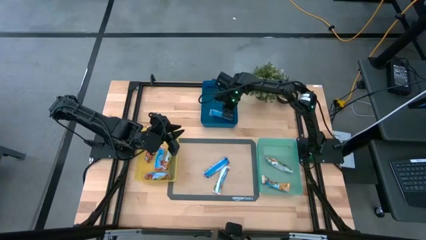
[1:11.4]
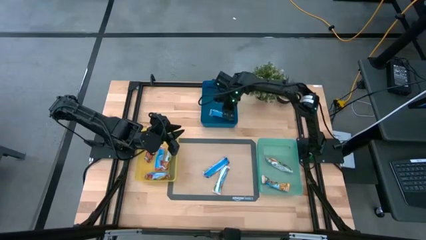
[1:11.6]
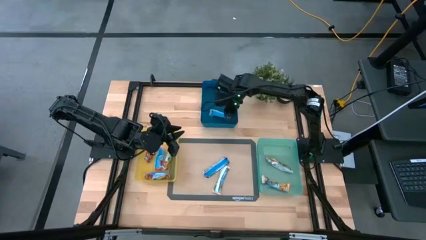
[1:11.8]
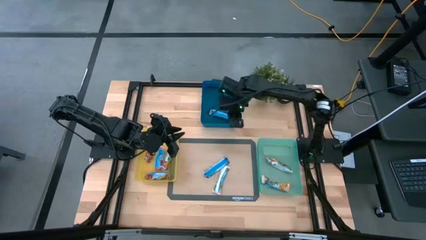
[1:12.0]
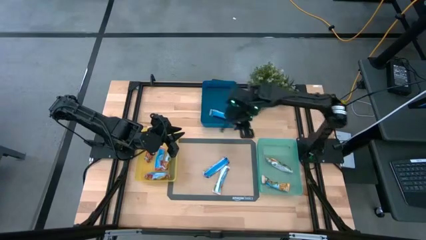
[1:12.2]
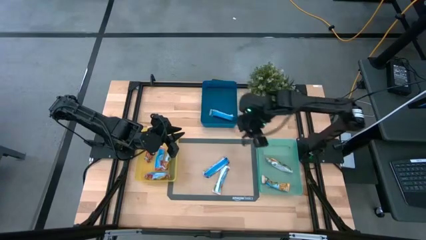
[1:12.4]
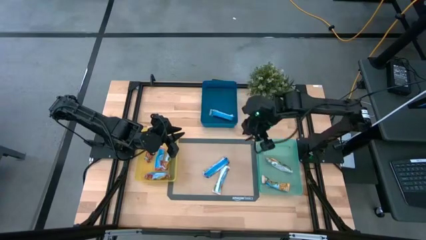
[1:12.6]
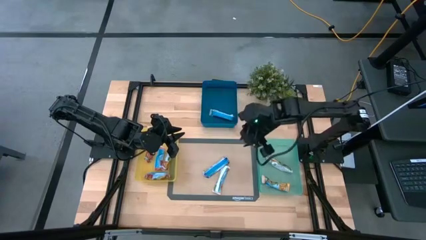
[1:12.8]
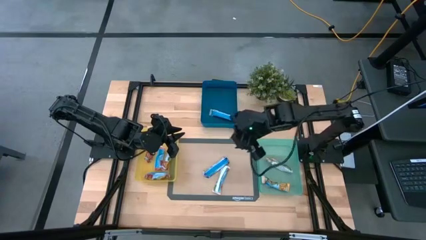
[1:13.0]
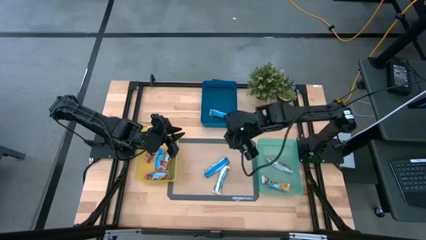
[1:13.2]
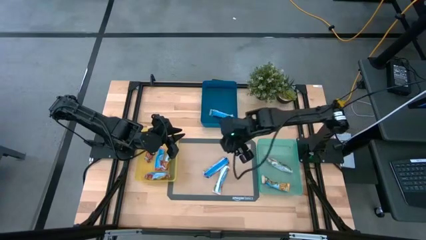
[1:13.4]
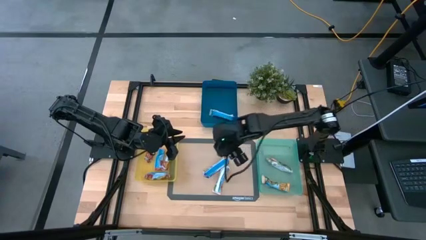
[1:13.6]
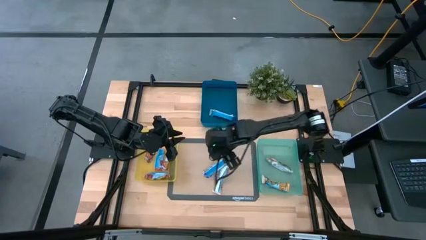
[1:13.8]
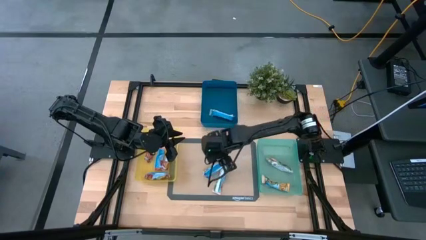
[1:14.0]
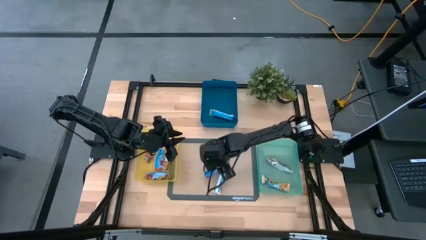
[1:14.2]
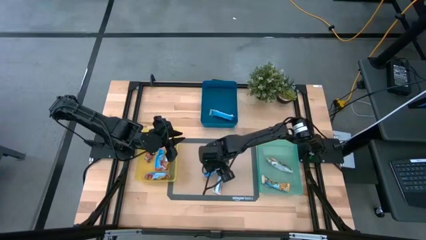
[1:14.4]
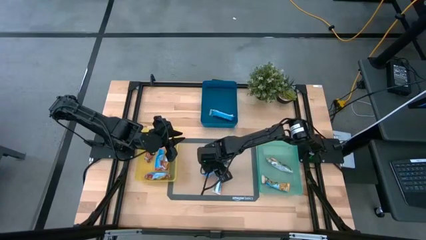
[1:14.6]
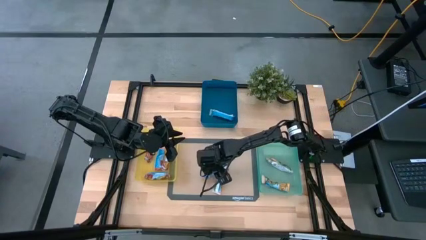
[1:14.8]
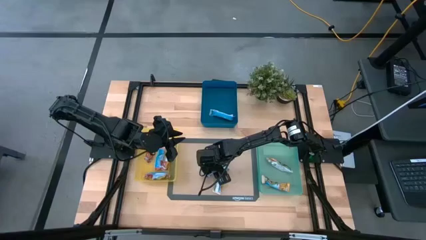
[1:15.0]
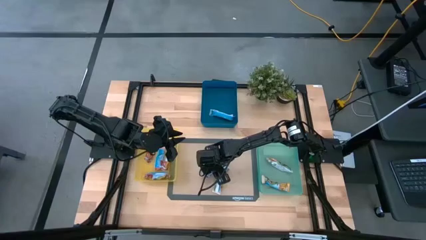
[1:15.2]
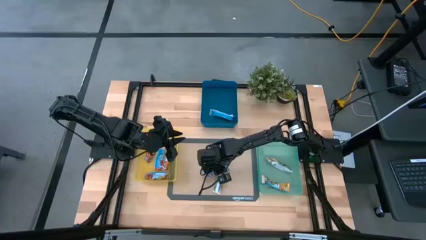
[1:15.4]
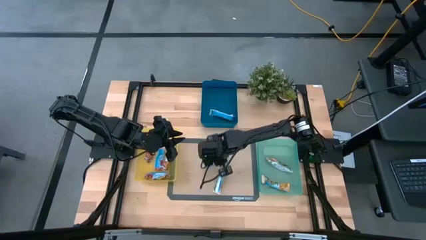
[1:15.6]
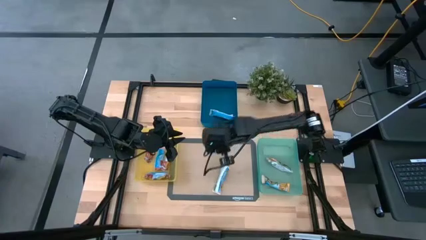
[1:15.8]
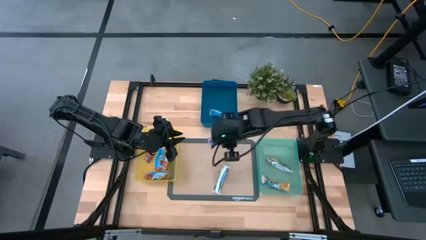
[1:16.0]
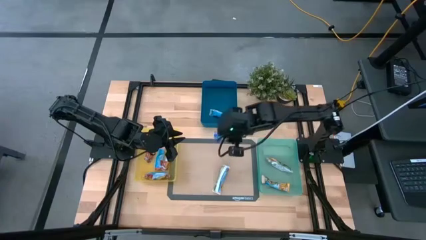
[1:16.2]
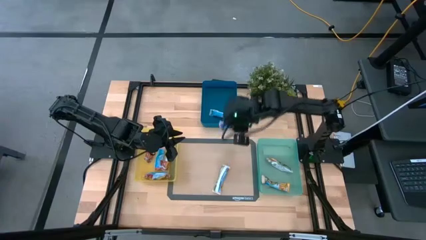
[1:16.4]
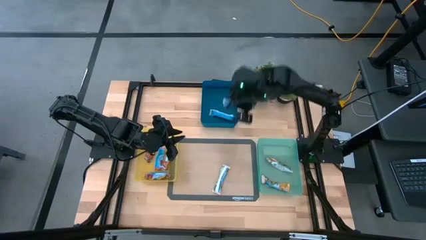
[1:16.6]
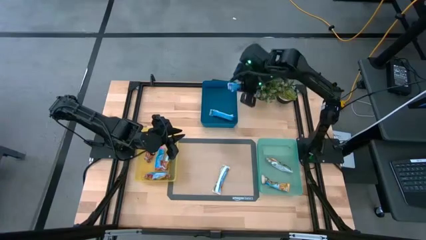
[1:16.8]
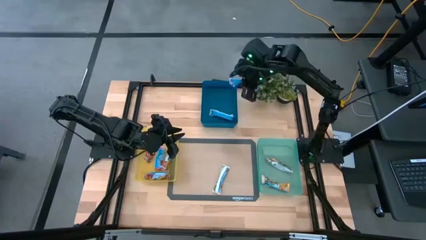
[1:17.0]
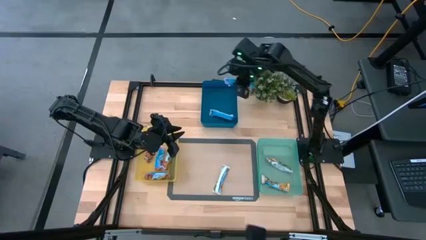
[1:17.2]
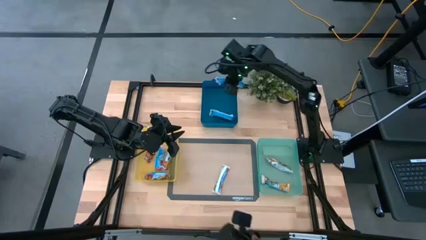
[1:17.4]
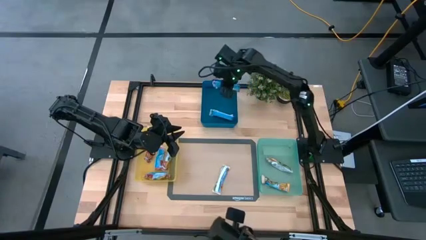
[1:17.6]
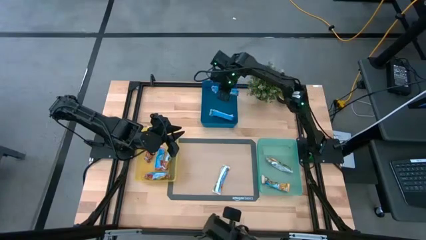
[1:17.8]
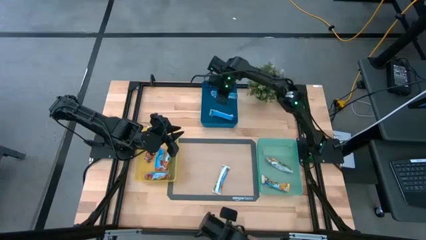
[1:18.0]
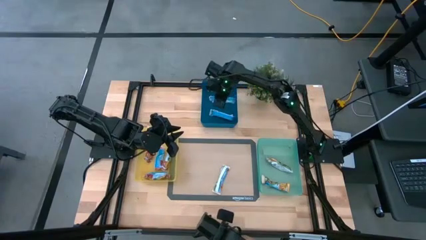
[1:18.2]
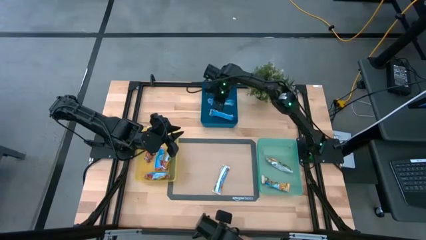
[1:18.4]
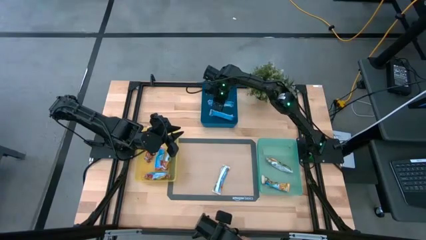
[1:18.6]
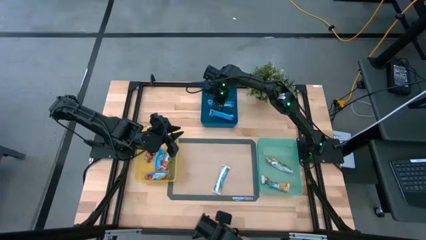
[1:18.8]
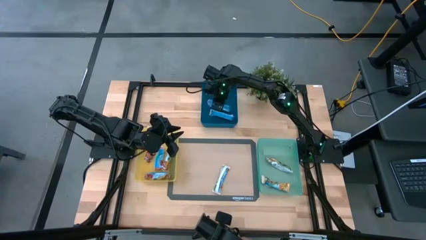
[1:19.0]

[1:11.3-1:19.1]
Task: Pick and place Granola Bars by type
Put the blue granola bar into the blue bin

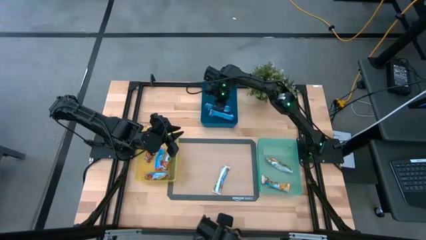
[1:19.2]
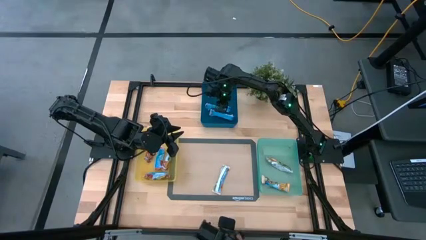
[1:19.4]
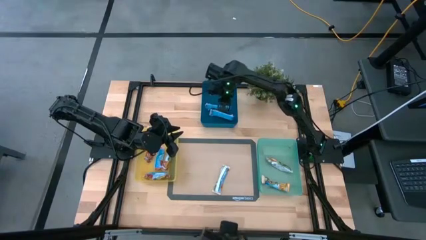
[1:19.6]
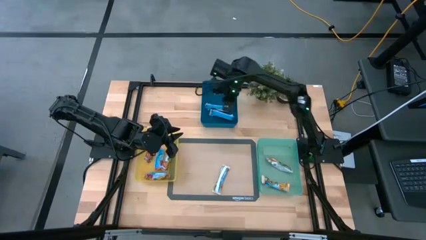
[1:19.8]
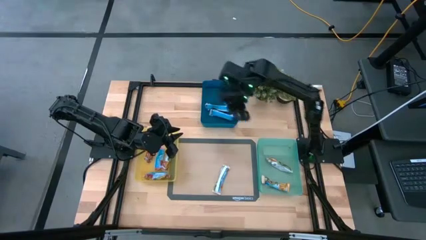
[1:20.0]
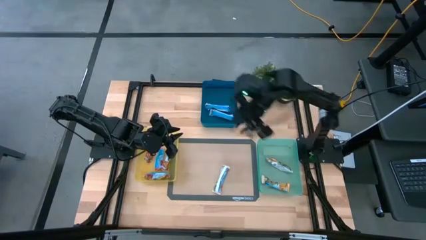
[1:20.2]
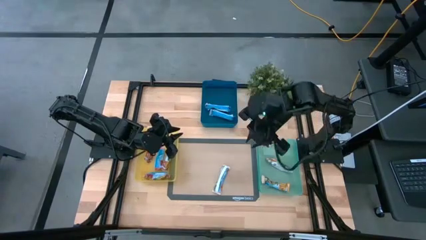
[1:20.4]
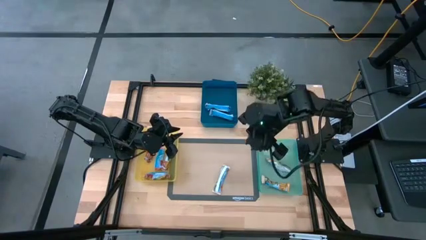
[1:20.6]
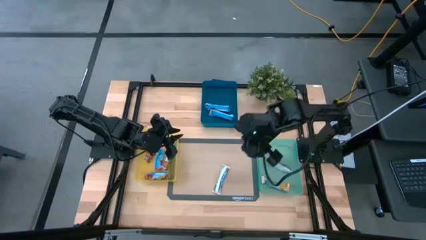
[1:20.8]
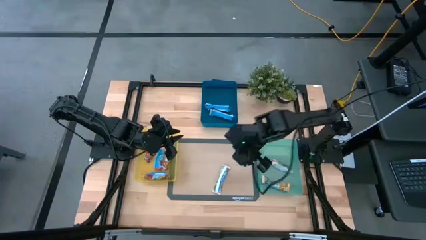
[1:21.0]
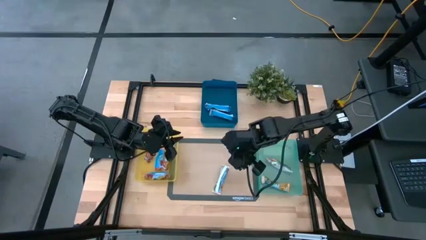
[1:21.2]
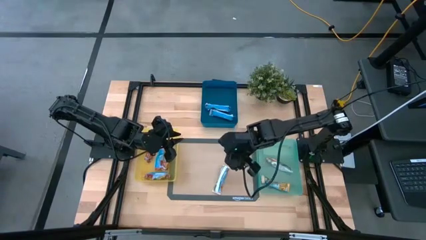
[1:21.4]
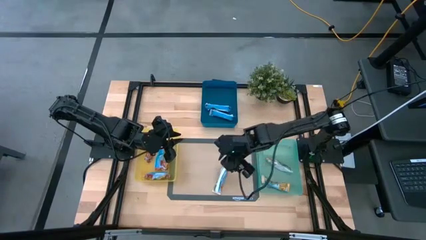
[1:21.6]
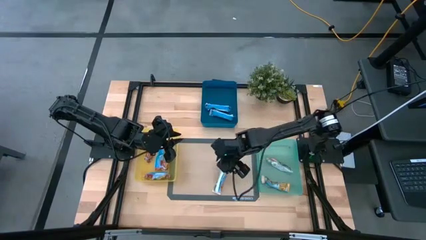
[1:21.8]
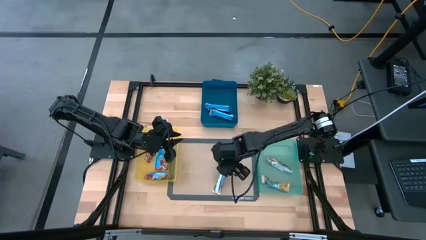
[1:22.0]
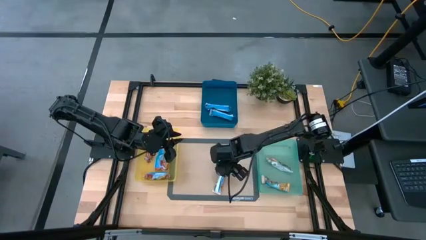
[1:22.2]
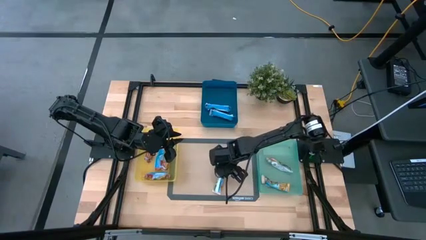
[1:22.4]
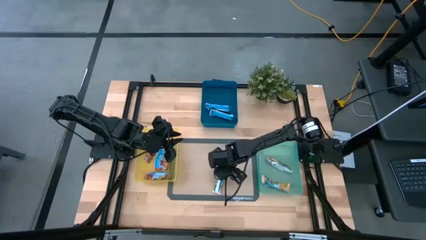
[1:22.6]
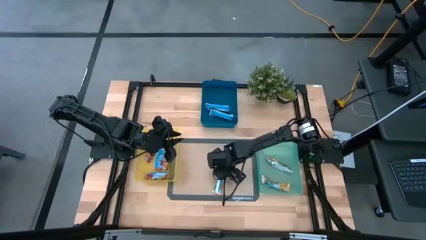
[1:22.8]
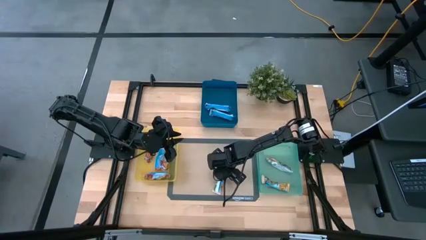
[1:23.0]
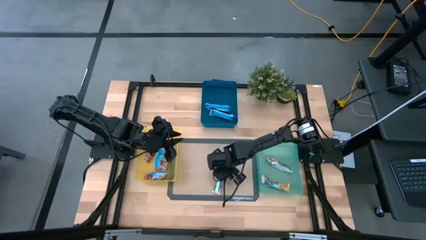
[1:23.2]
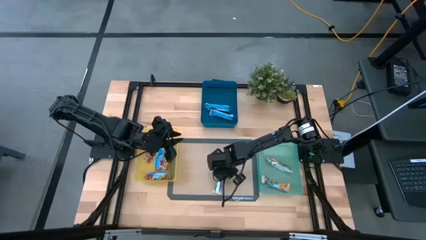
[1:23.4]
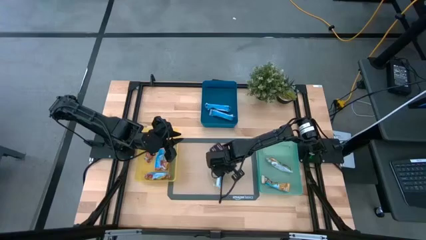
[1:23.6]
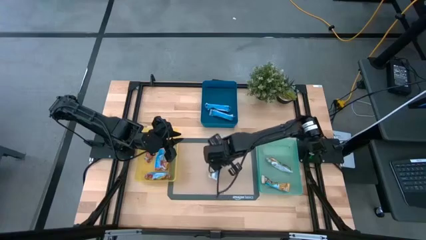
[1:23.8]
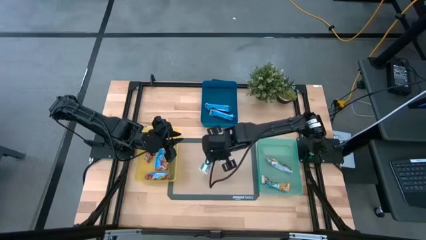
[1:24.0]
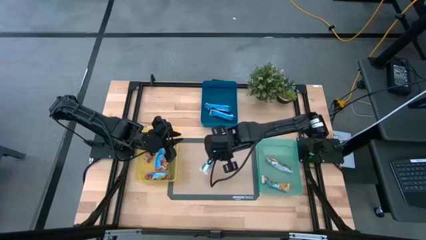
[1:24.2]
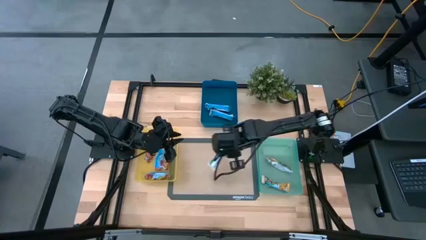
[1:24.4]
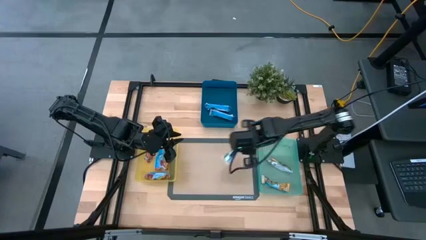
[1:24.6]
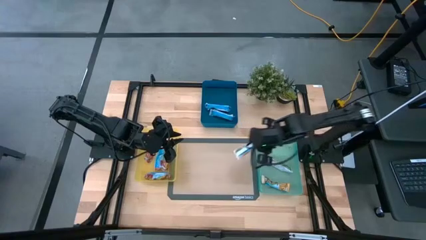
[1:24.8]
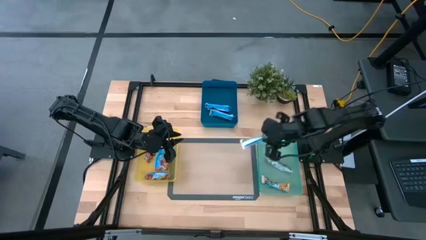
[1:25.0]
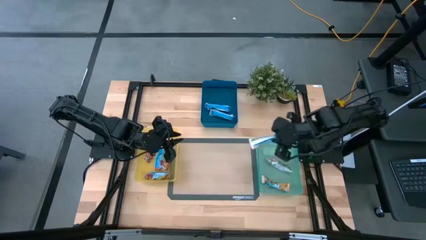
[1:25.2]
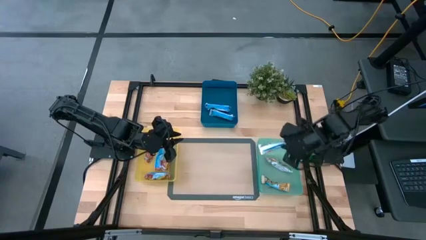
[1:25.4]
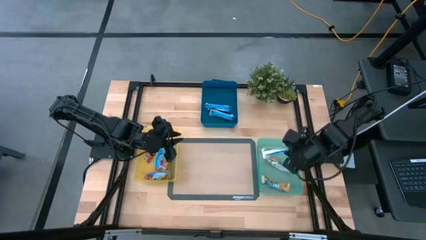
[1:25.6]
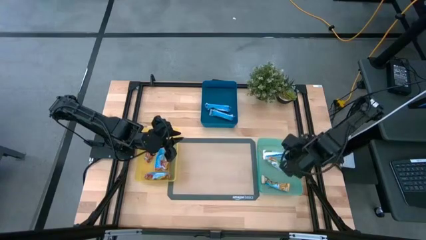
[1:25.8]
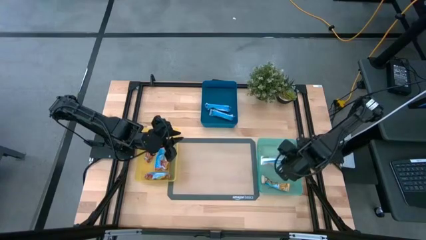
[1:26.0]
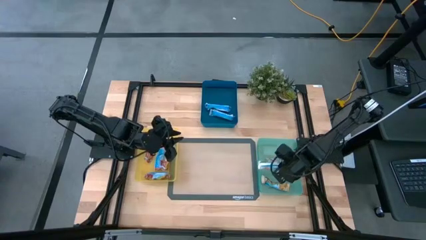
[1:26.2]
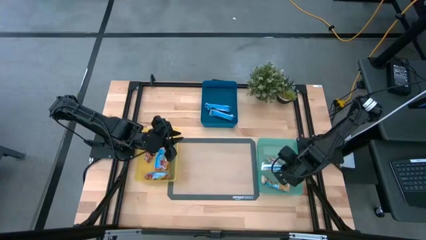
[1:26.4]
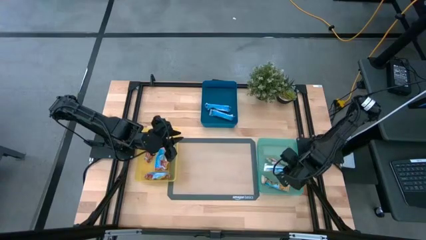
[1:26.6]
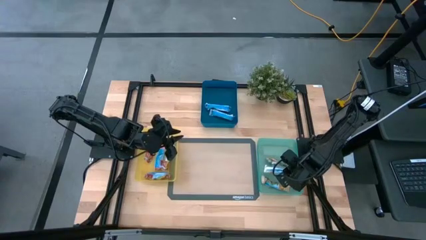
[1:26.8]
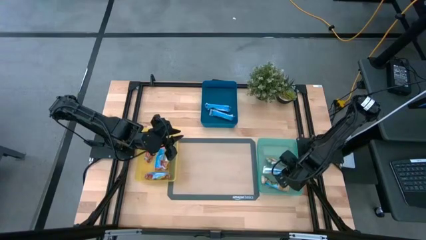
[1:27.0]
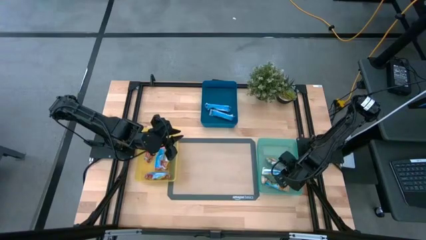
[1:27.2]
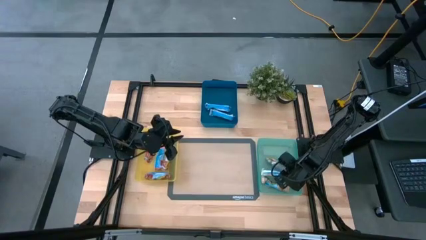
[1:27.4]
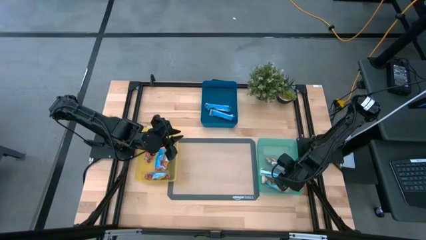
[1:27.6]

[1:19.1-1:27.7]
Put the yellow granola bar into the green bin
